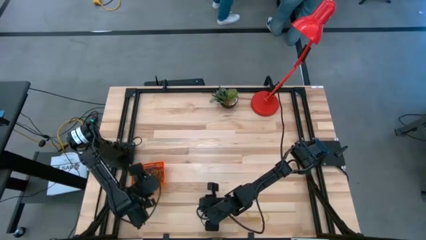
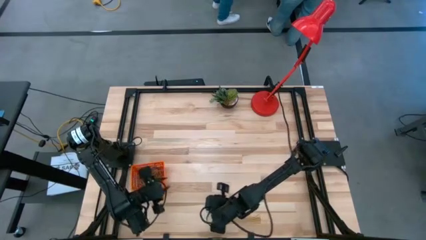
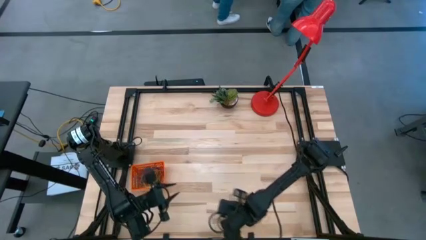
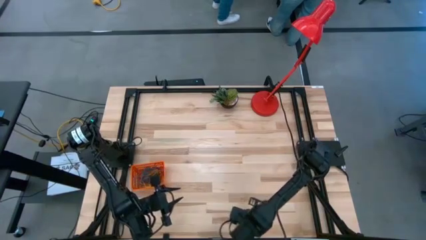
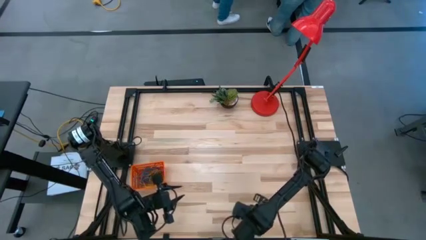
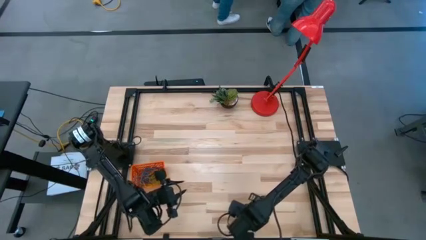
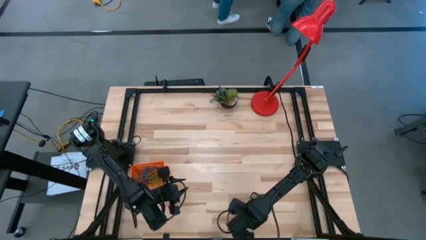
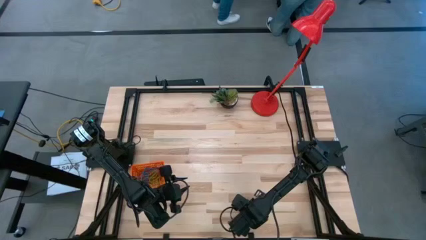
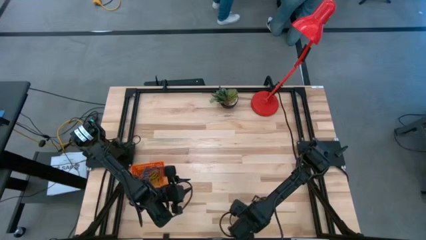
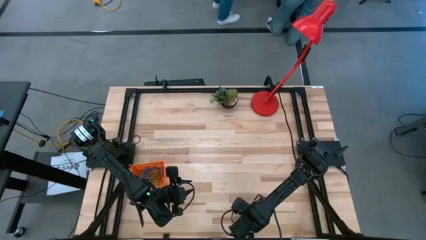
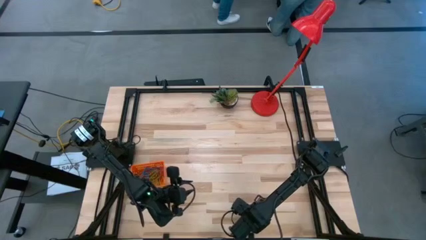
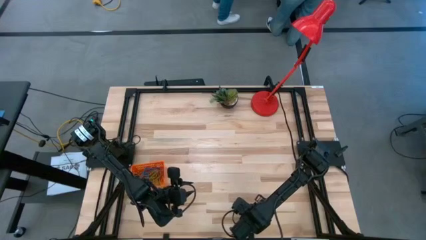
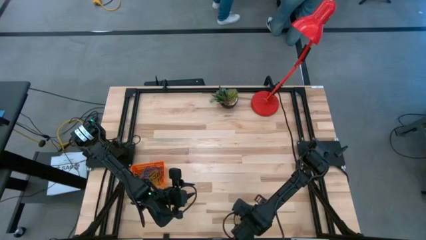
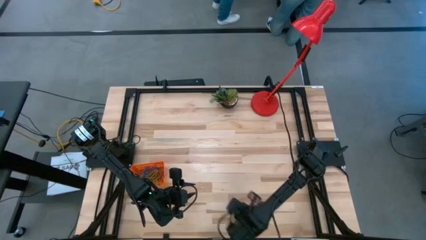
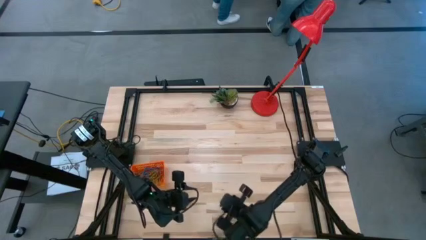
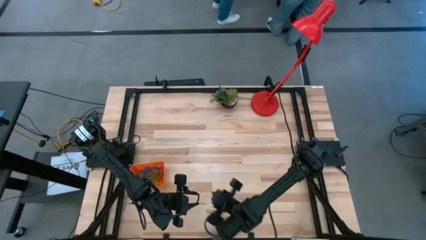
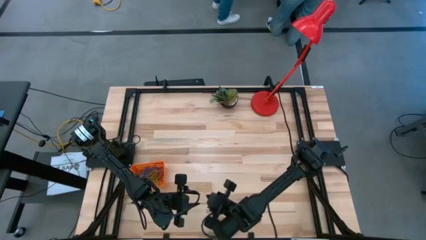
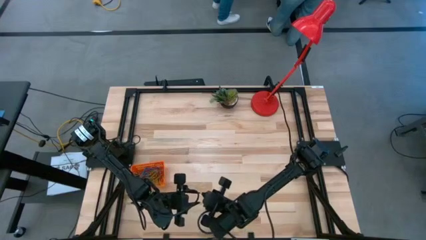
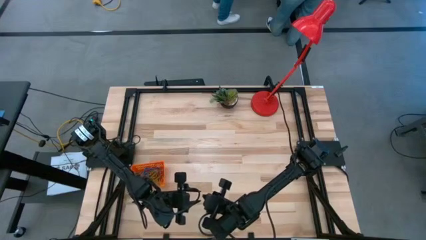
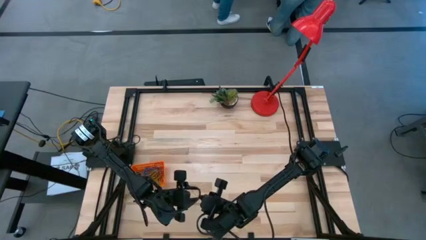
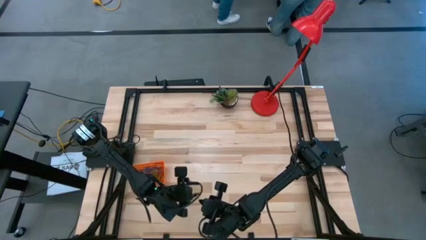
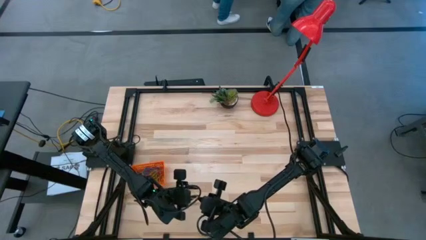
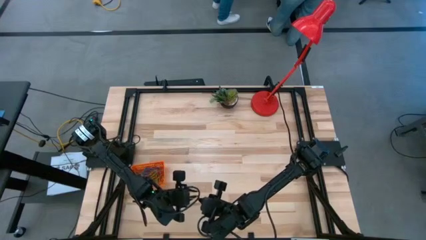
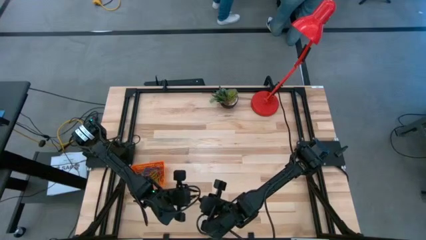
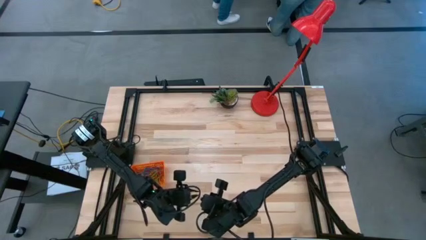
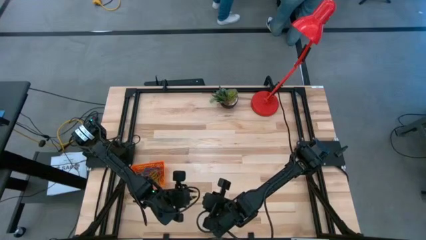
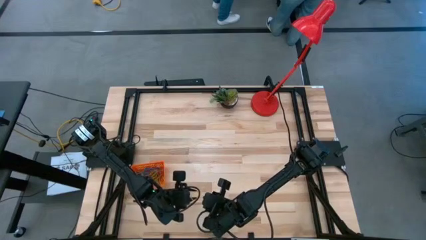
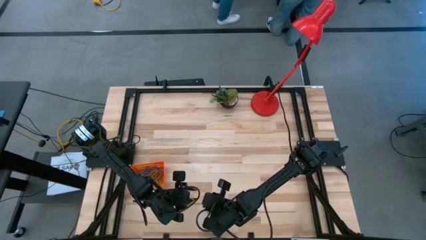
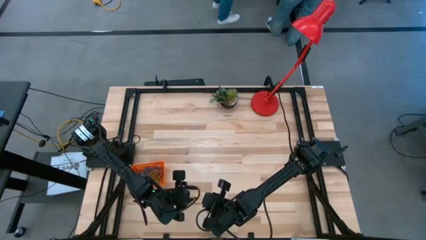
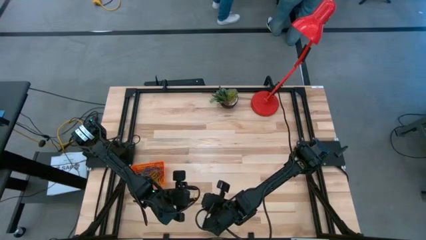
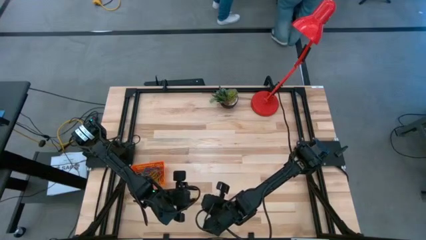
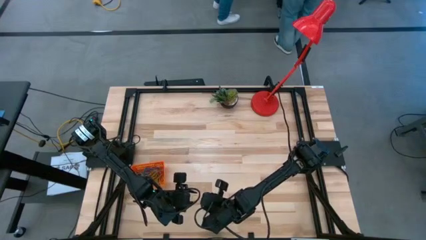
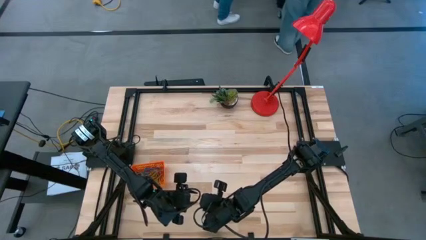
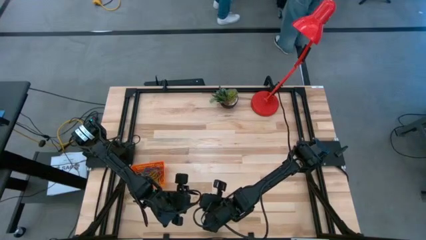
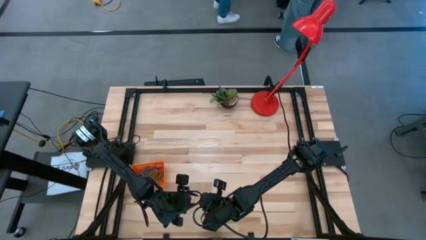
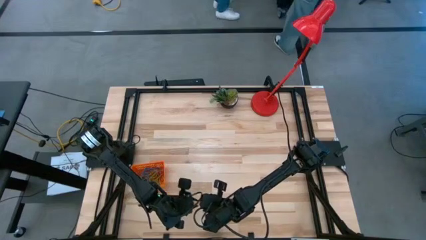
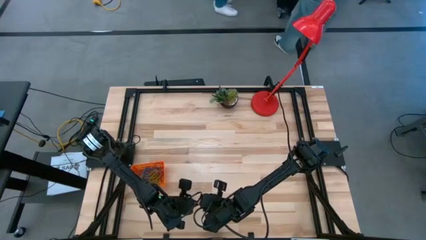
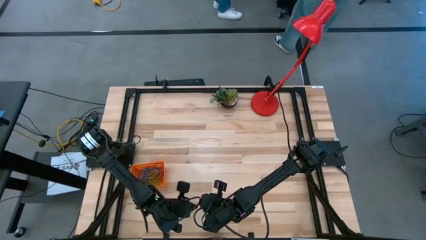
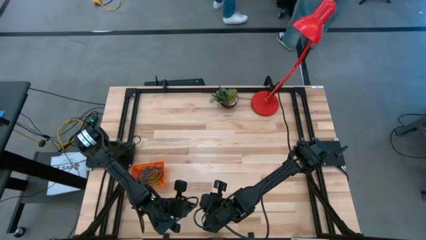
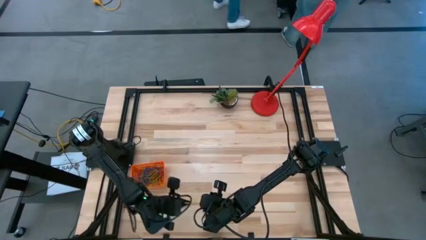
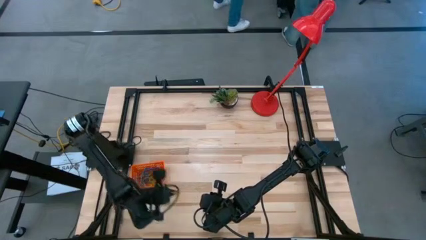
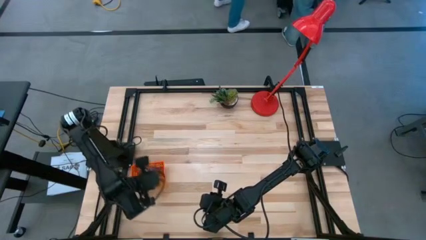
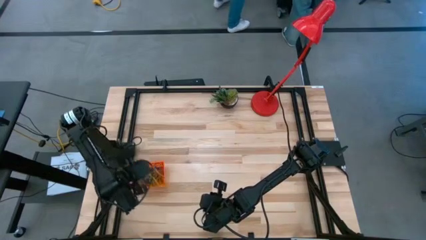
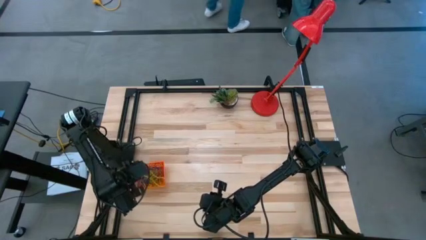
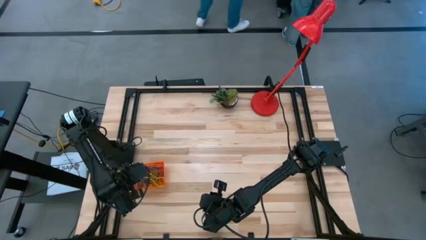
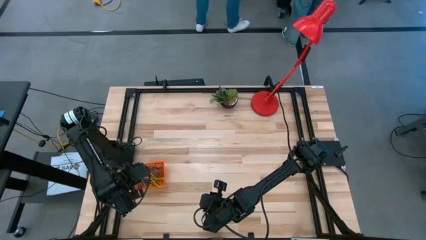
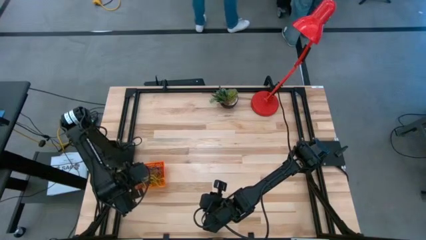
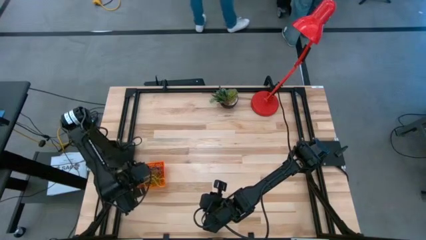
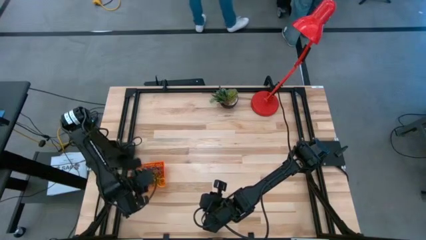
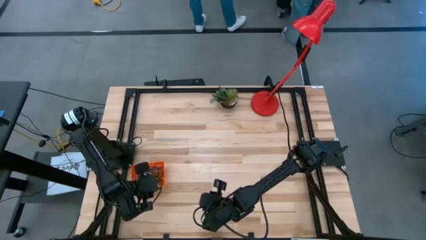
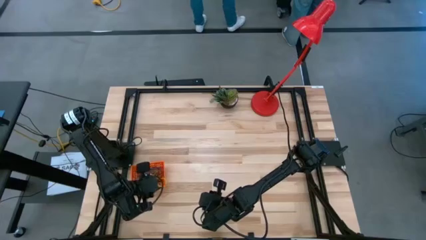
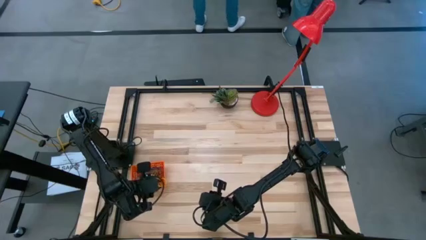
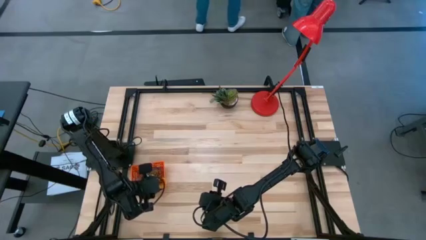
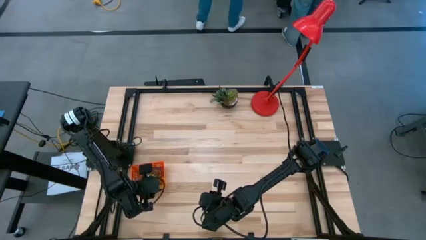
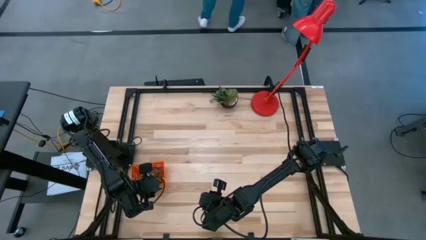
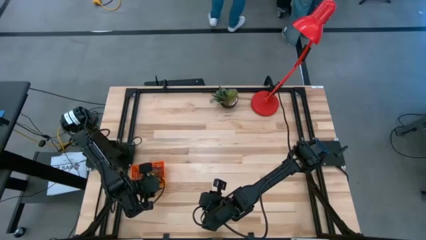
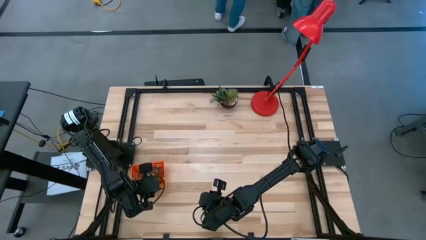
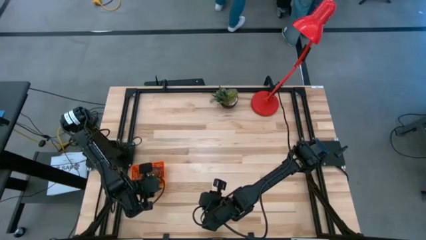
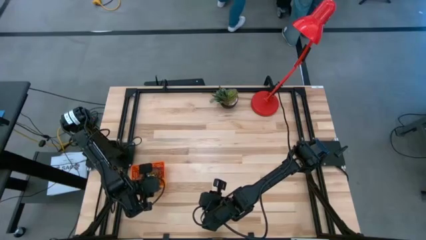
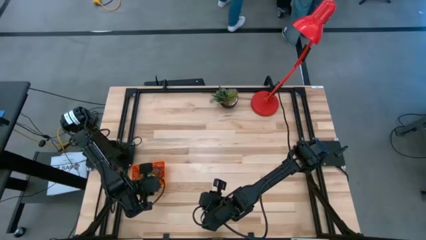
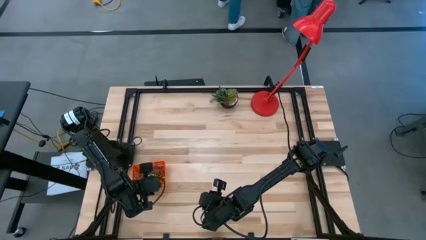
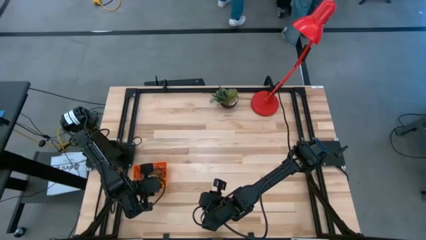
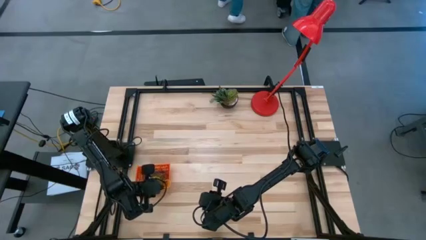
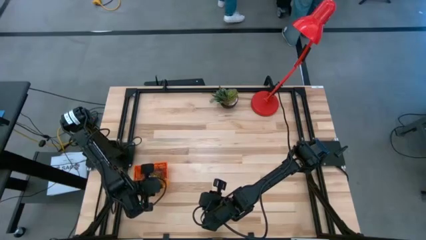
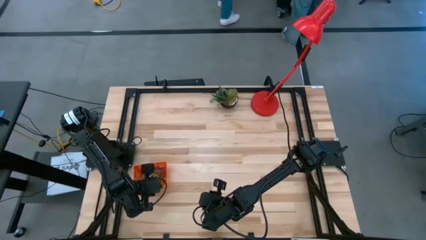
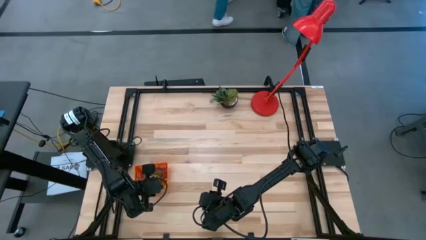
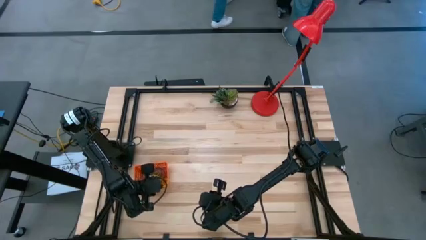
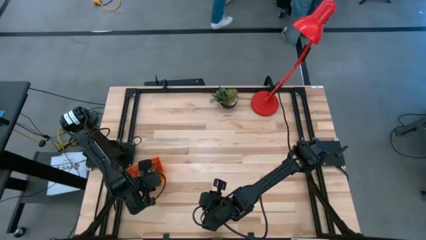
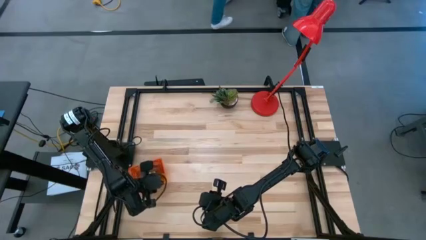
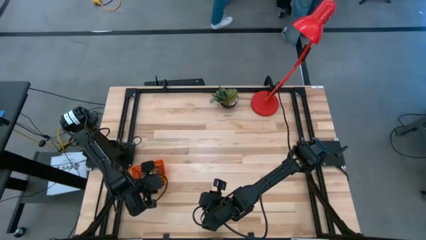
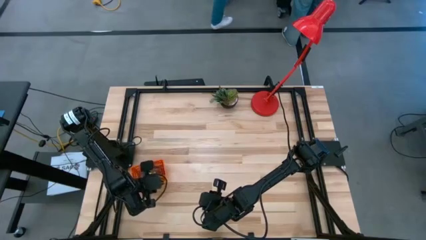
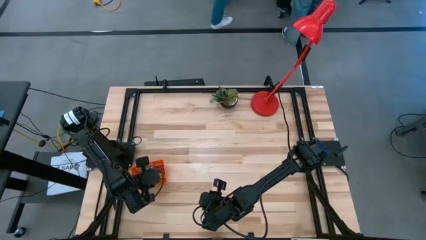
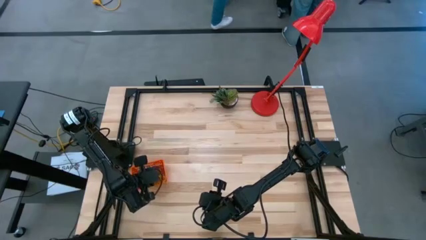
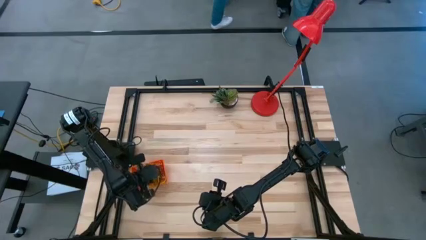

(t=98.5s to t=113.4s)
Task: Pick and place rubber bands into bin
Put the yellow rubber band into the orange basket
